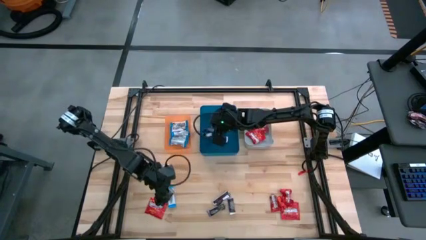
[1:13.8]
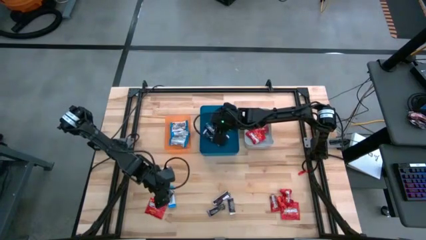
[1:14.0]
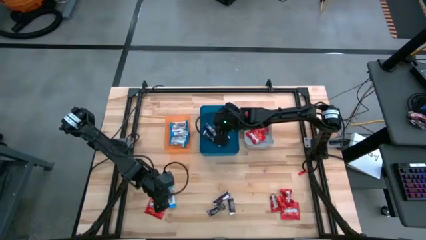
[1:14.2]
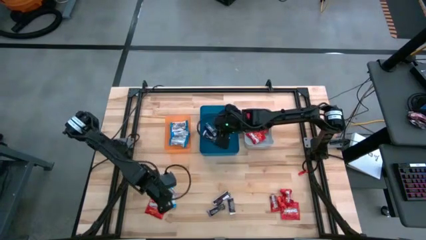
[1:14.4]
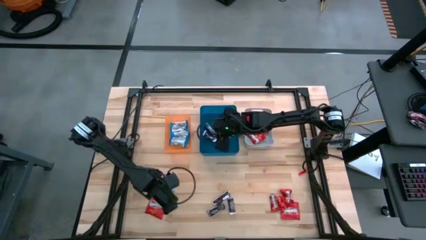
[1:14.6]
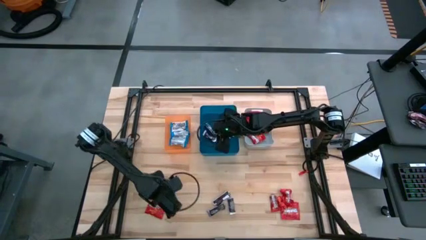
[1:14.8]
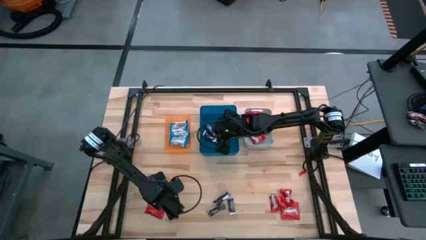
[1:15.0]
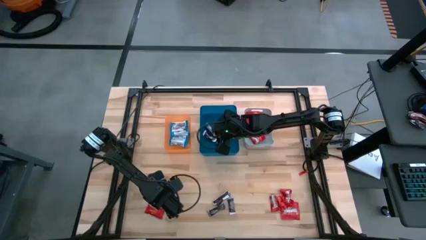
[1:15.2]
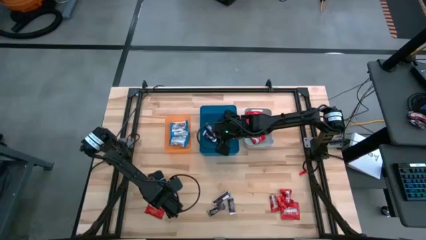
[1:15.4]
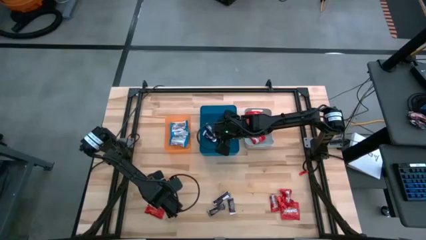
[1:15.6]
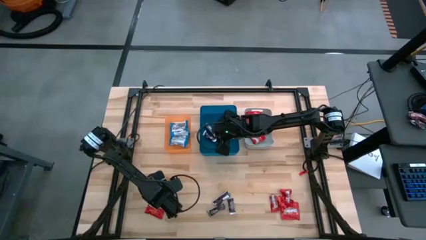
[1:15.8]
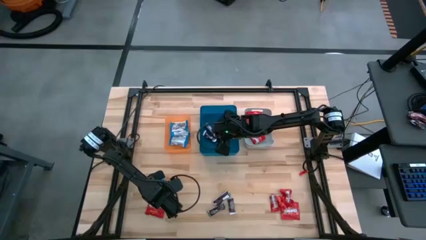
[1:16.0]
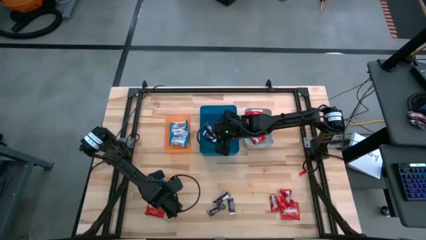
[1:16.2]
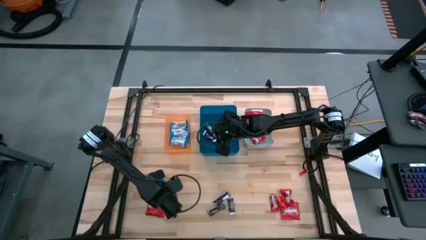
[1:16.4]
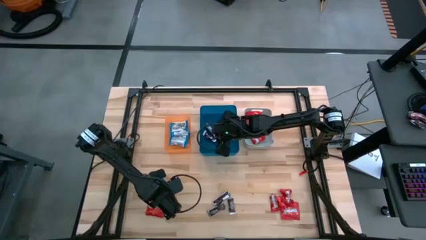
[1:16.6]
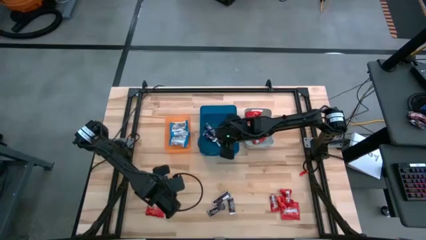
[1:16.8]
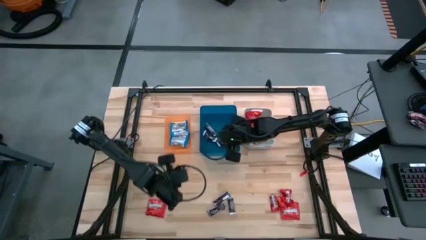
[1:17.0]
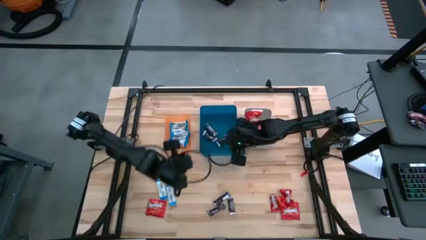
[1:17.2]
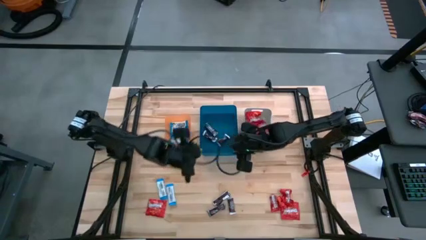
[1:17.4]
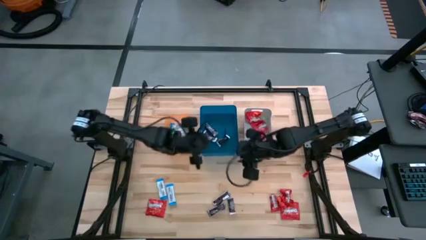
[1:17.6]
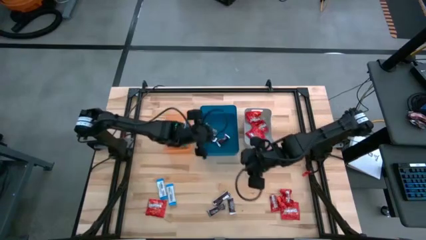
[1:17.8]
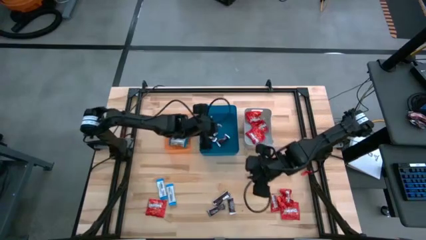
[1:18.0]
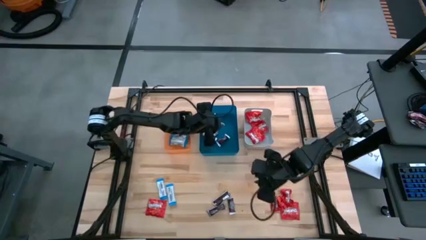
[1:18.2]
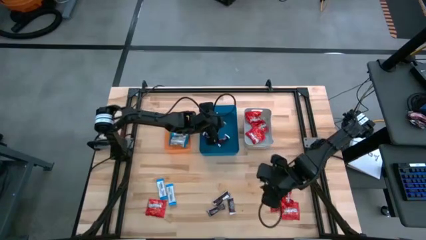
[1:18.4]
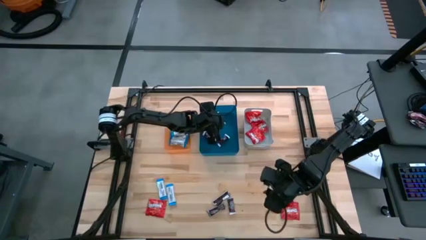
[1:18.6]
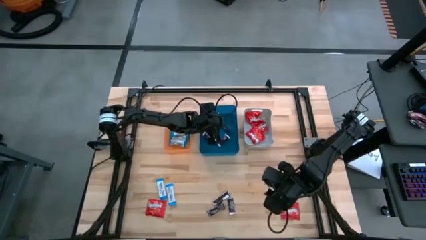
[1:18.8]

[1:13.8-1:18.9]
Task: Sort candy
Put the brown chocolate bar into the blue bin

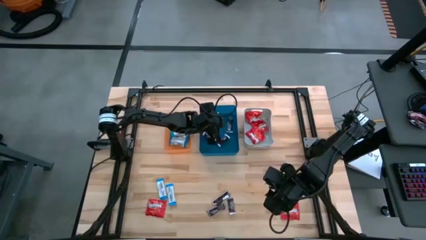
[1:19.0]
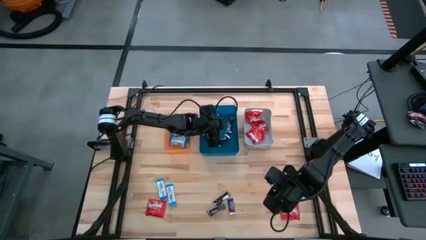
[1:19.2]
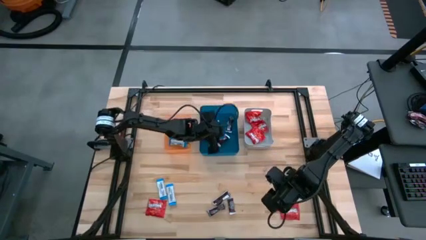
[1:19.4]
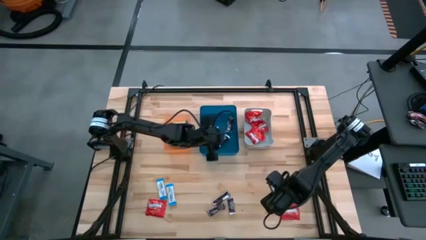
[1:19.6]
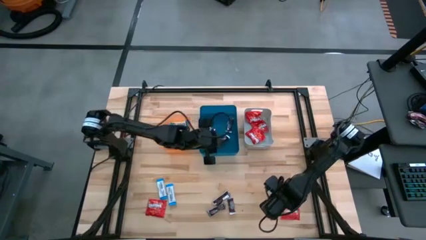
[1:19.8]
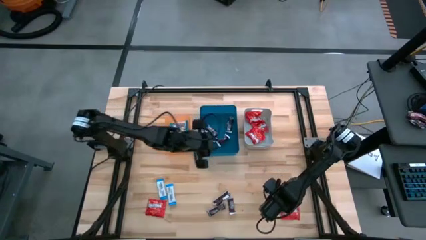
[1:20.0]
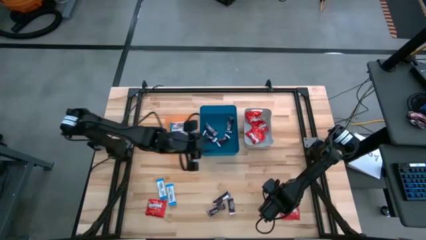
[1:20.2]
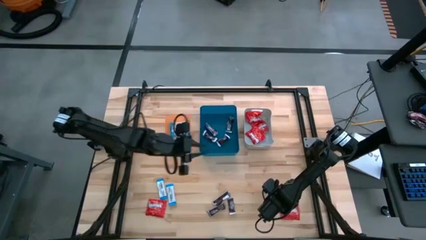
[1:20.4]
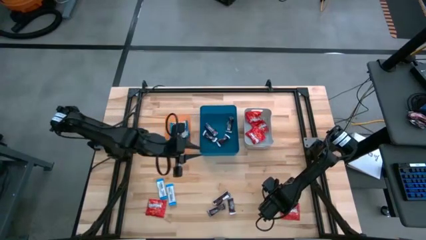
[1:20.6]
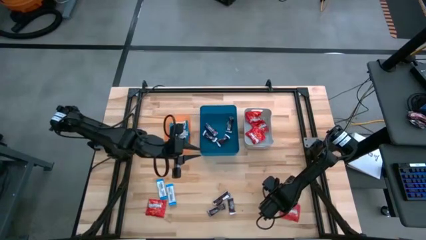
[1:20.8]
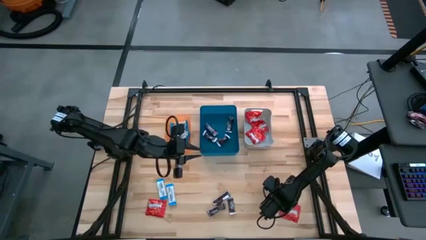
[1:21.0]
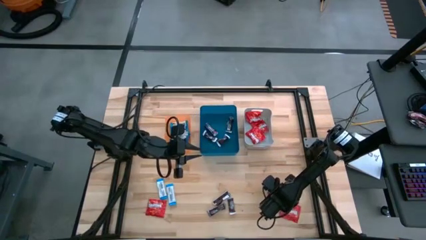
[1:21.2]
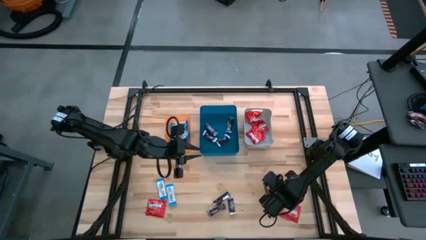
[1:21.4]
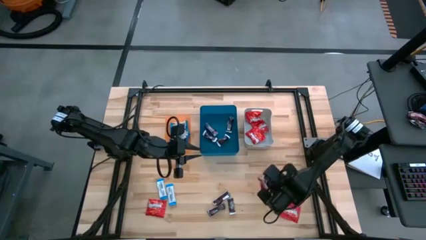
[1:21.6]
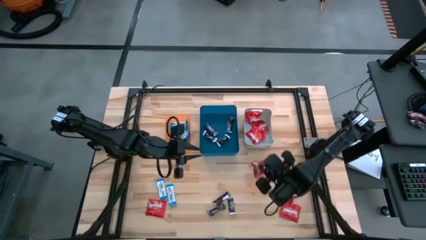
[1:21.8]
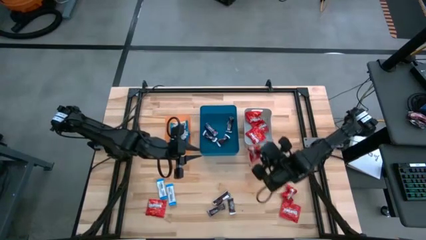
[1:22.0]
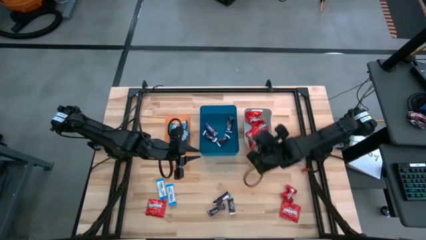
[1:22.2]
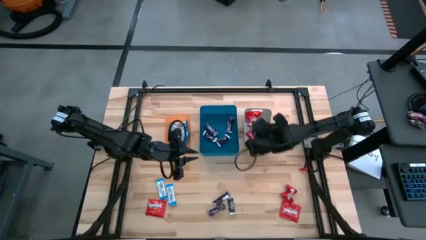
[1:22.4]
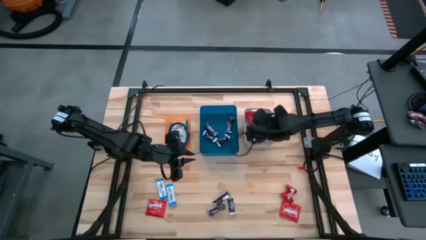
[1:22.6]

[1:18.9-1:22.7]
Put the red candy into the gray bin

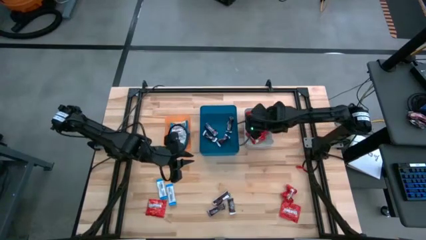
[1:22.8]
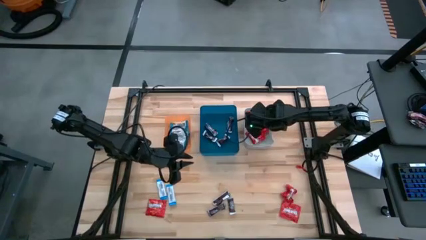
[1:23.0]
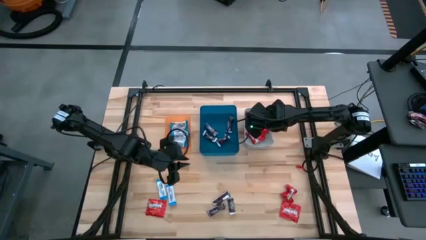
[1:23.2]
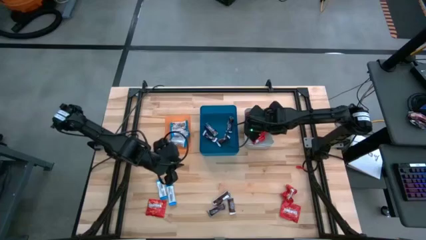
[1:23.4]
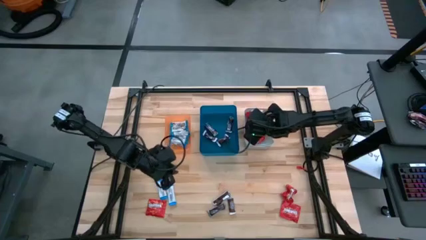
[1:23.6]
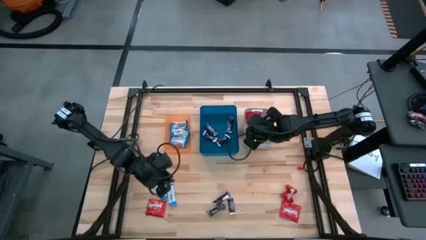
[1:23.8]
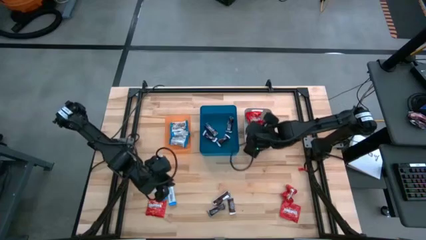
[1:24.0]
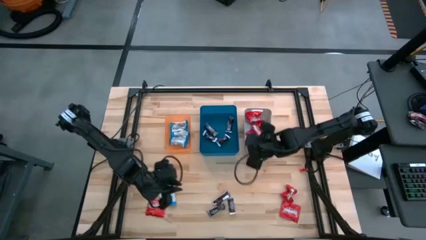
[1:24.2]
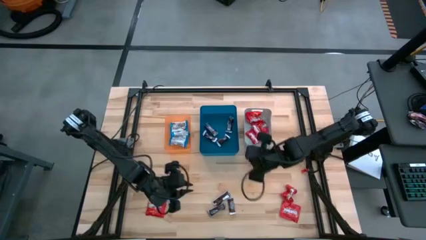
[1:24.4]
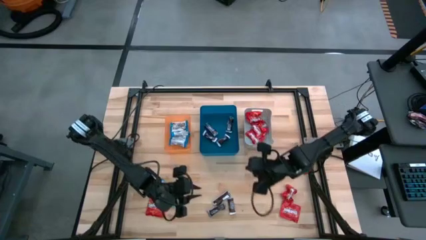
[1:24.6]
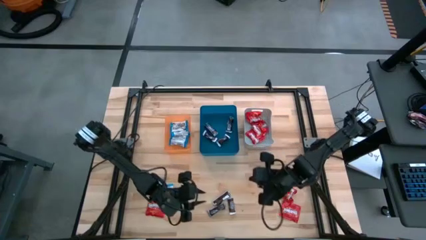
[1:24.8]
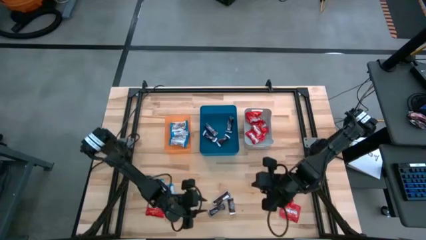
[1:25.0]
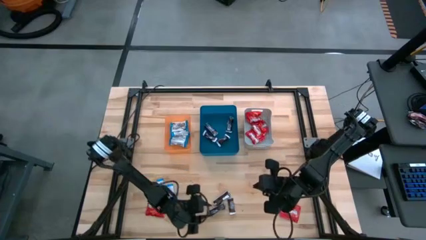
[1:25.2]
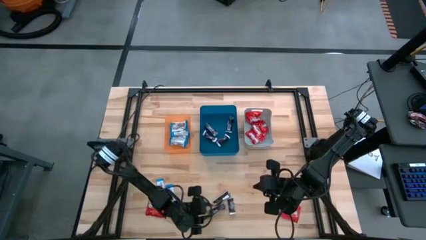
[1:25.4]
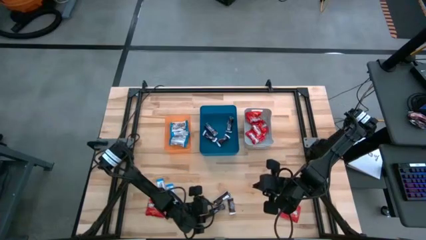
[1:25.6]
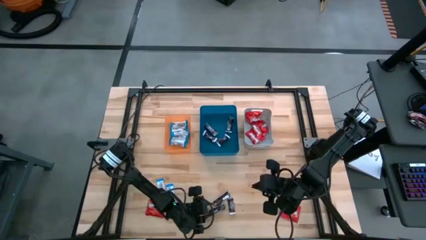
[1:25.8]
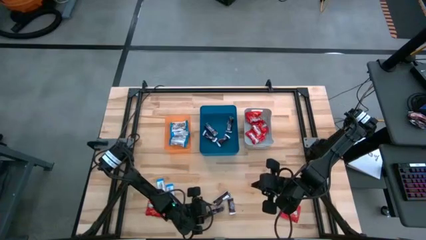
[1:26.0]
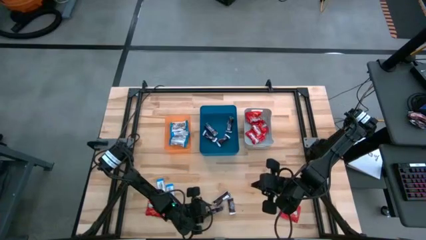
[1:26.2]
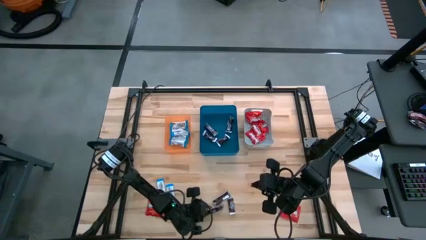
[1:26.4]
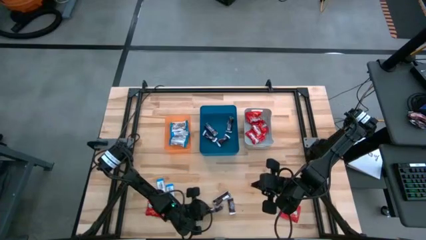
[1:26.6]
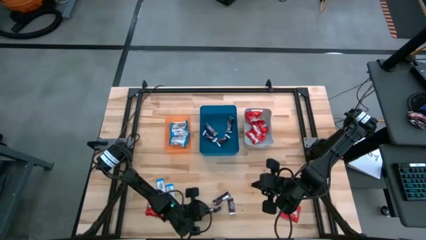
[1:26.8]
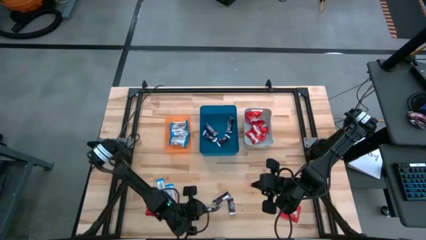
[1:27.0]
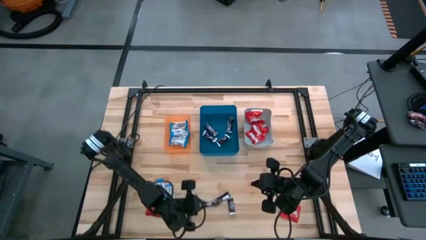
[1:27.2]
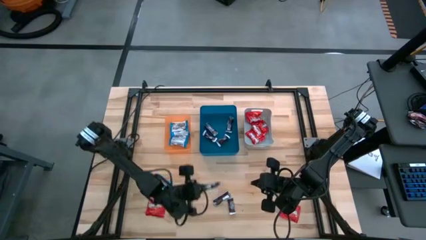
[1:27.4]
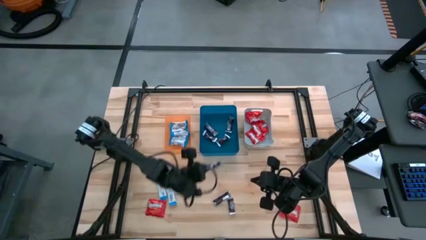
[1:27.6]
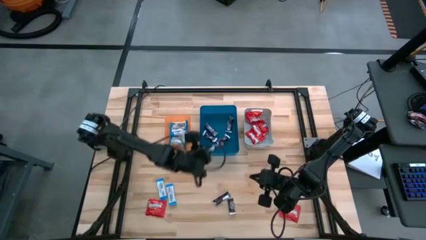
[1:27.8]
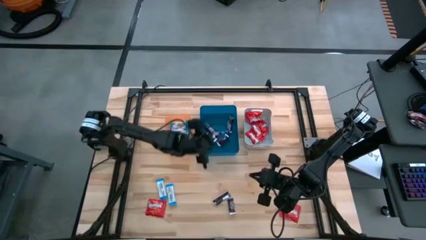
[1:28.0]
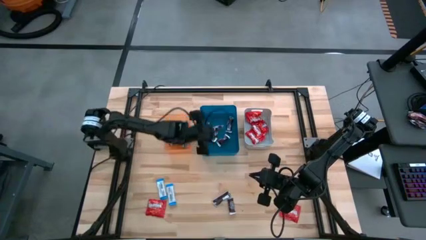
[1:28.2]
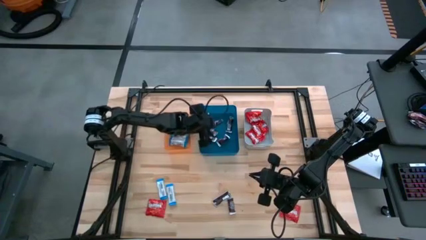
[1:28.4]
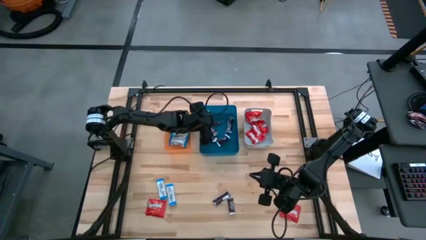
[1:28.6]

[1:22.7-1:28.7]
Put the brown chocolate bar into the blue bin

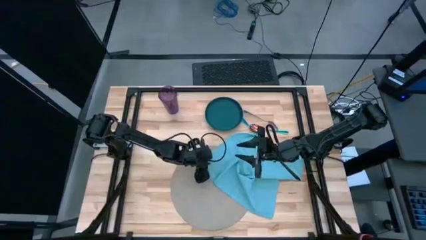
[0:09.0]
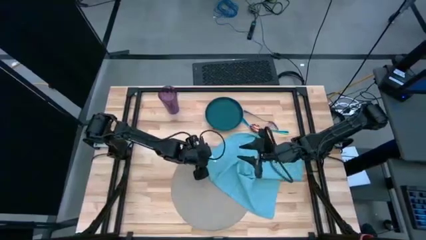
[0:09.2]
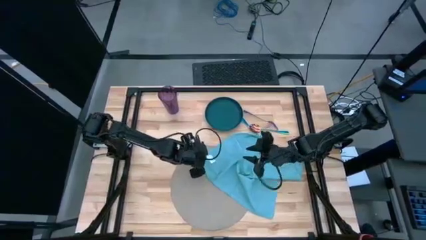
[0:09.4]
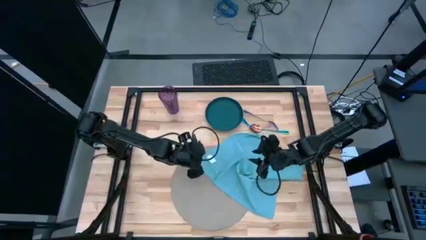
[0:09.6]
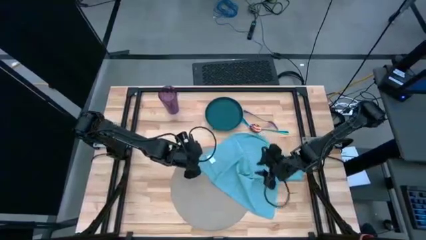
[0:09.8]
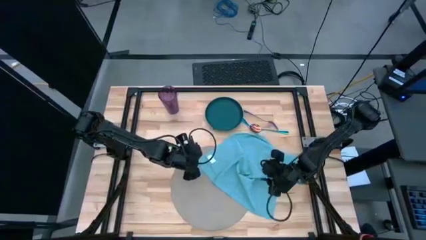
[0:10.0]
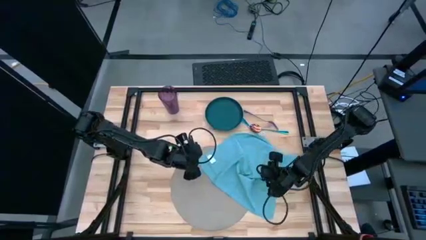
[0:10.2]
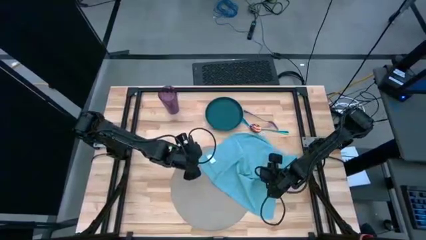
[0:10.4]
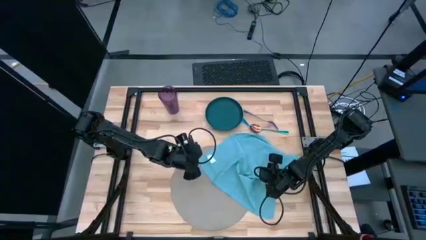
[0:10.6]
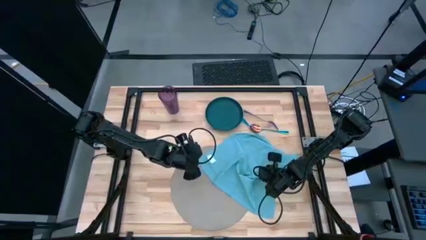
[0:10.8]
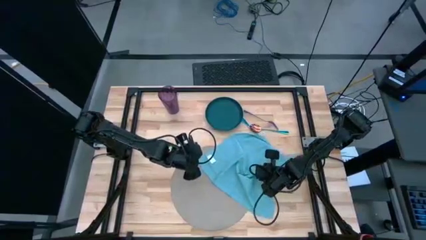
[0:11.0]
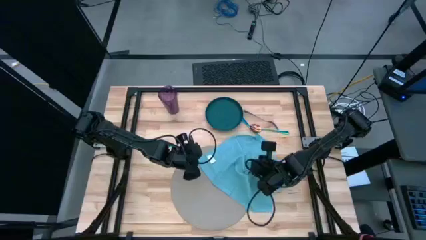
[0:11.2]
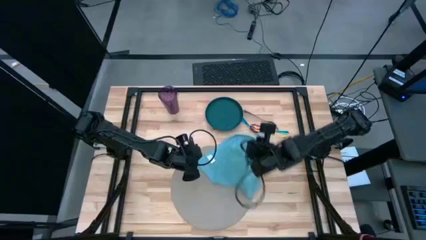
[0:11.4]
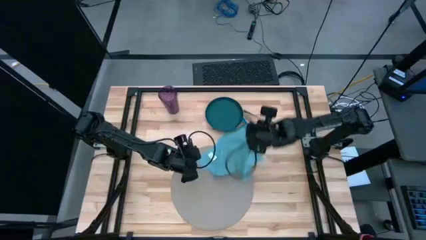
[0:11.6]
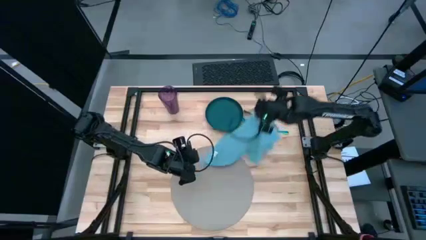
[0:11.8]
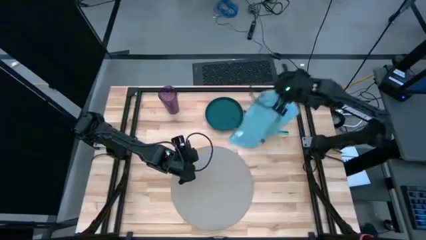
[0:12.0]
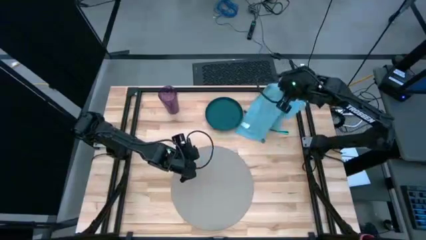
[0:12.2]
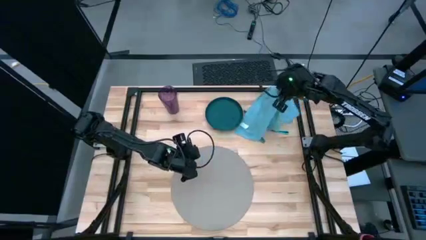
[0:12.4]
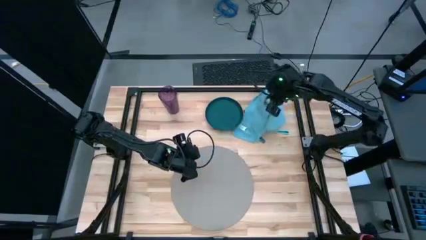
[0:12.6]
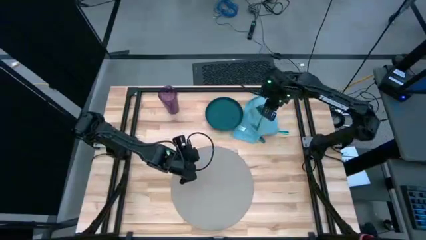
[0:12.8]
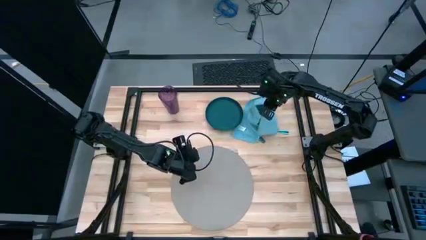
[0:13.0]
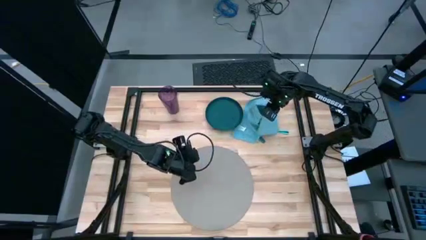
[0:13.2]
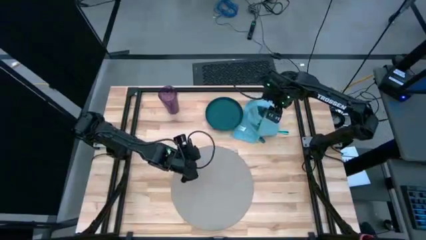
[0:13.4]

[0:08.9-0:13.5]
Task: Set table place
Move the blue table napkin to the top right of the table
